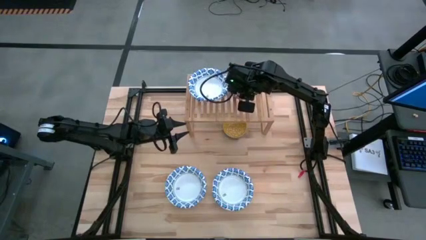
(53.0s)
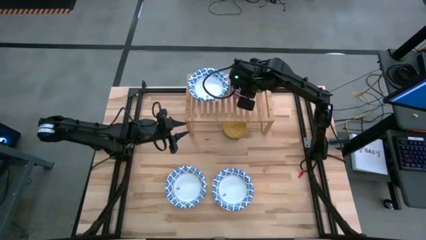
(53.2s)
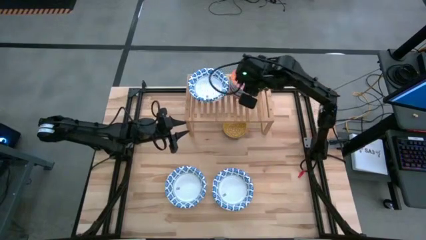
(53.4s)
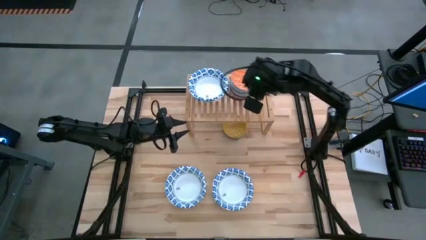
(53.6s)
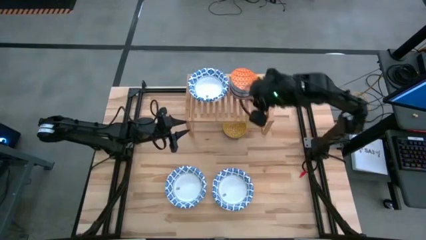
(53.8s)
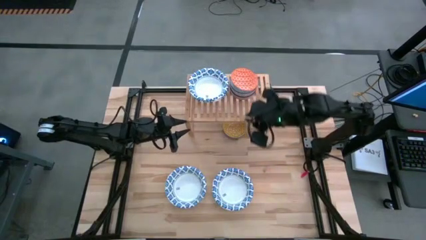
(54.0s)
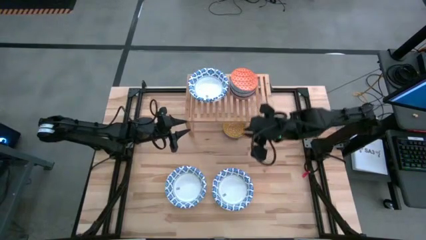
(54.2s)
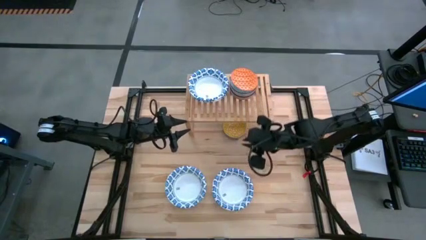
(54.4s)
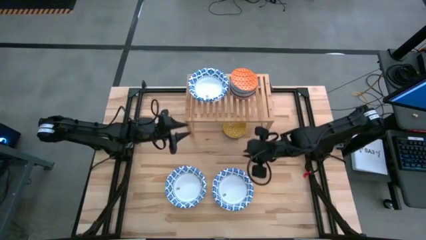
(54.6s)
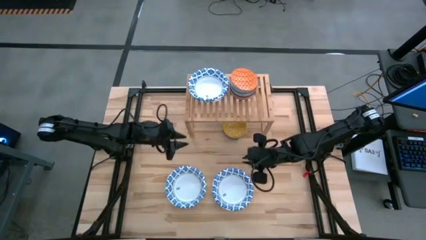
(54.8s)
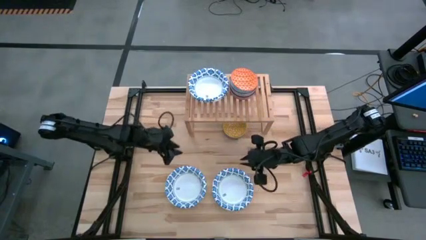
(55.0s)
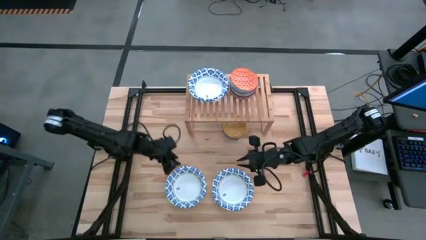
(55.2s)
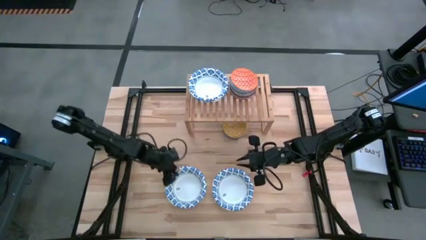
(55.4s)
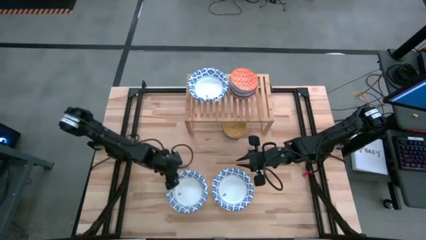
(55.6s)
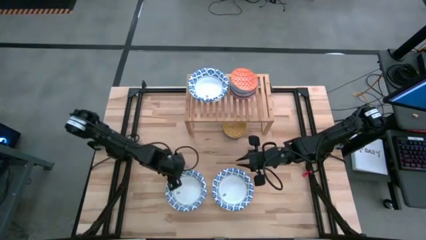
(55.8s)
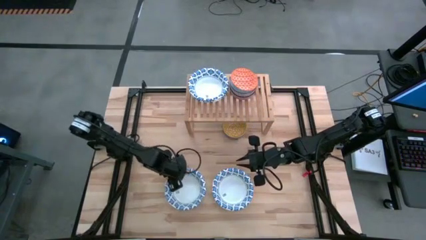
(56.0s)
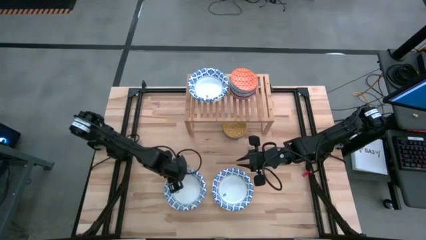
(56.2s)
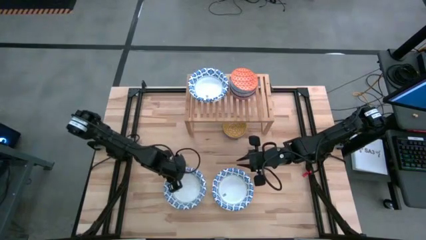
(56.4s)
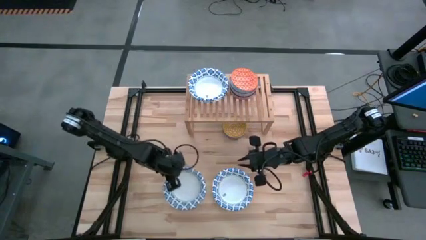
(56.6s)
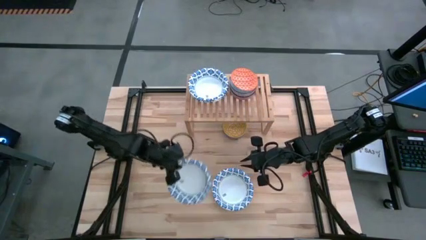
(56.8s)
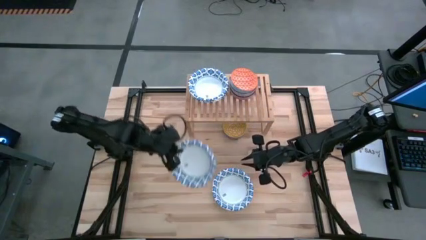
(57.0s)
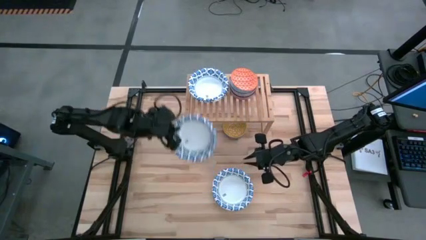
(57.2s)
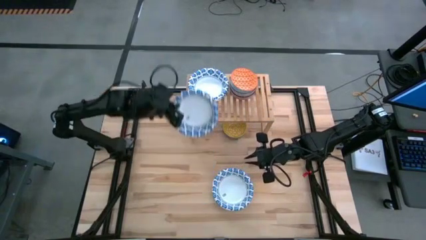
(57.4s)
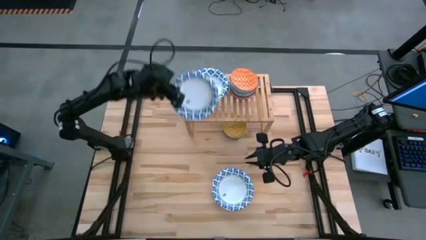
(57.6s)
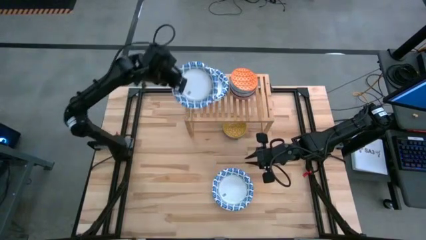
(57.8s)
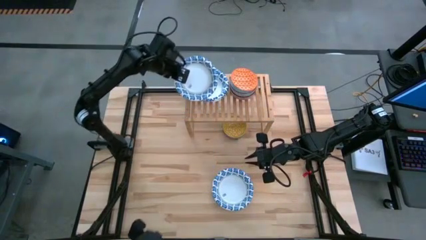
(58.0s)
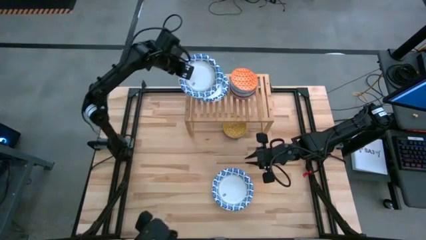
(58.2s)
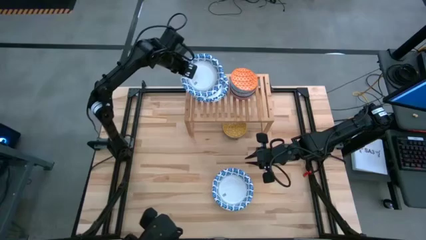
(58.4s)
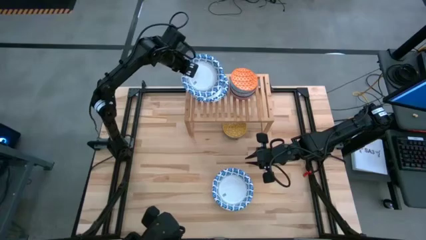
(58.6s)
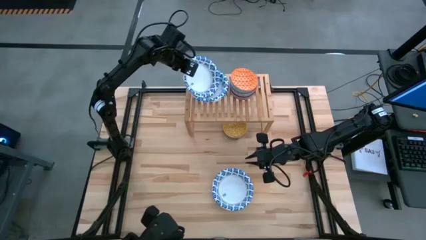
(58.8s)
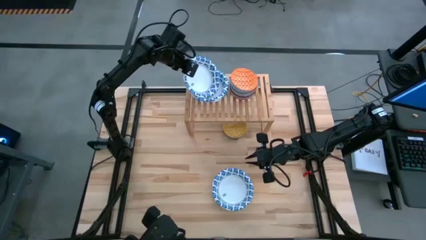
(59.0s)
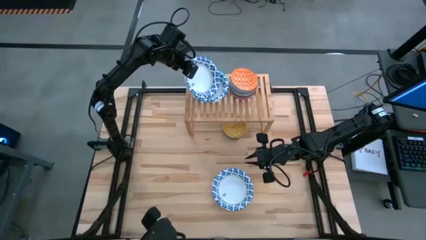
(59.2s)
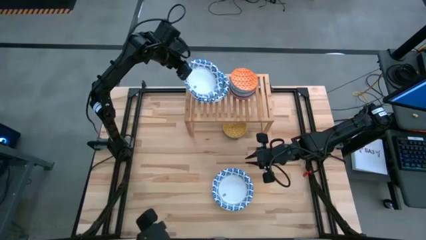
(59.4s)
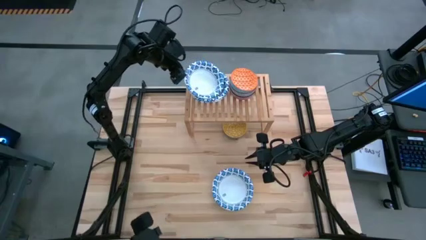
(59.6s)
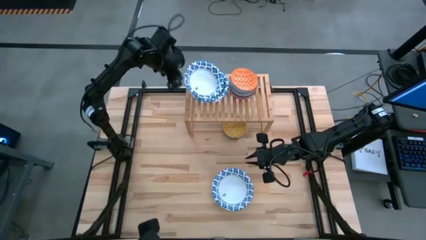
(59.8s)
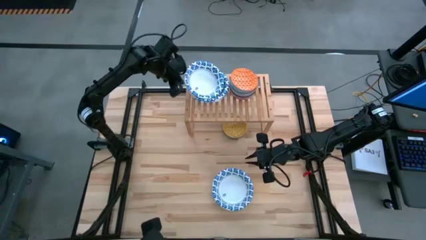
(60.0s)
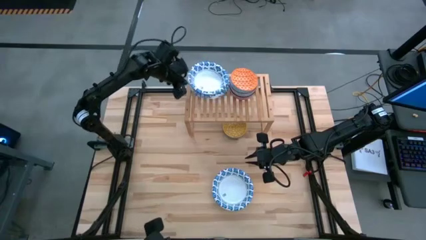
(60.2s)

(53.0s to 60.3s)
Task: Place and stack bowls onto a shelf
Stack the left white bowl on top of the white bowl on the shelf

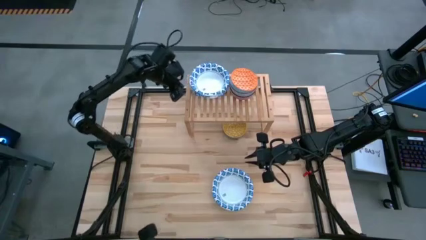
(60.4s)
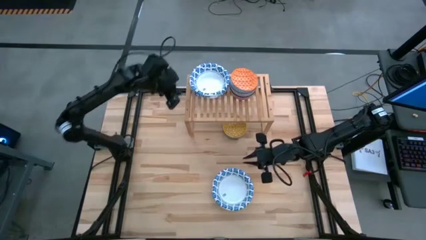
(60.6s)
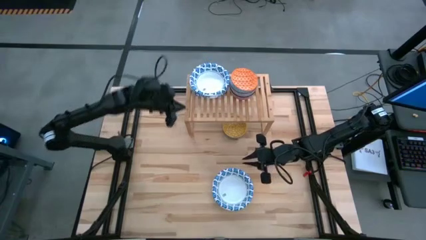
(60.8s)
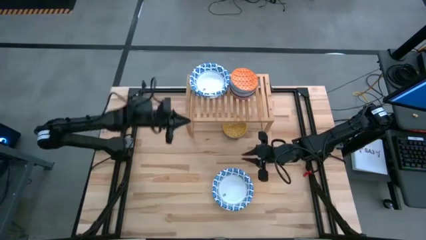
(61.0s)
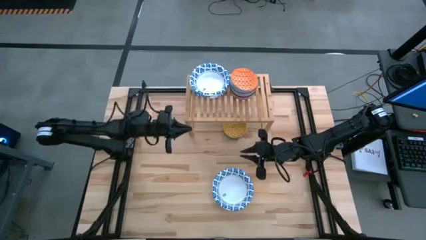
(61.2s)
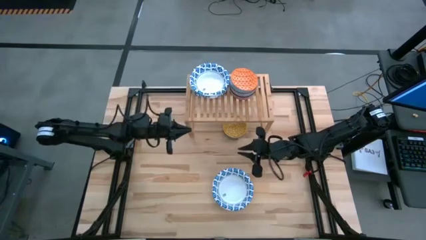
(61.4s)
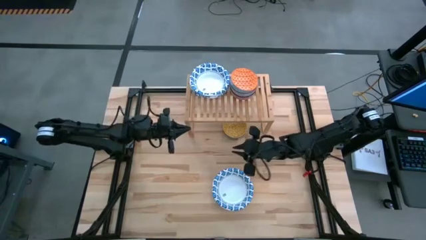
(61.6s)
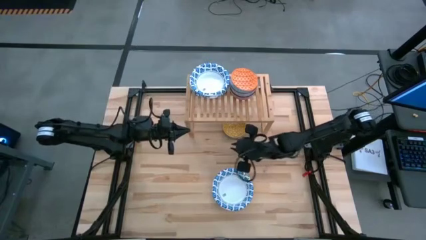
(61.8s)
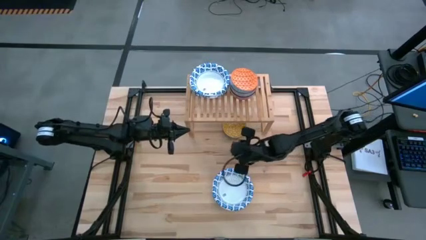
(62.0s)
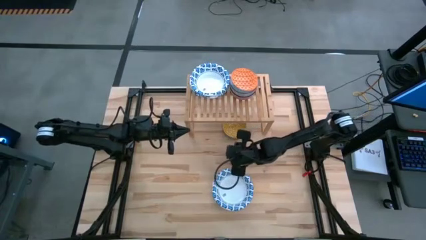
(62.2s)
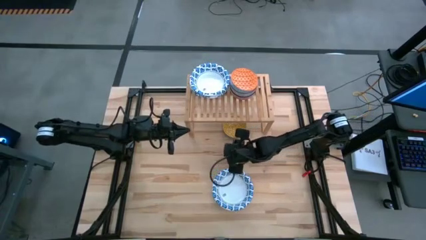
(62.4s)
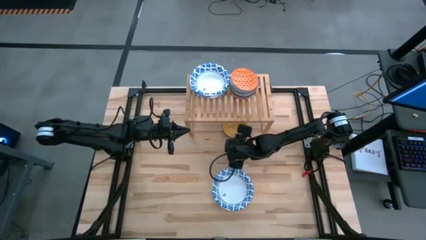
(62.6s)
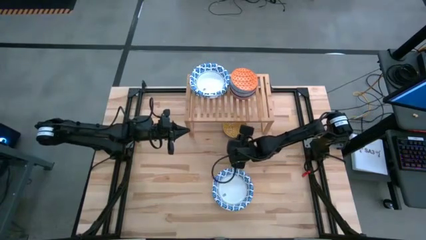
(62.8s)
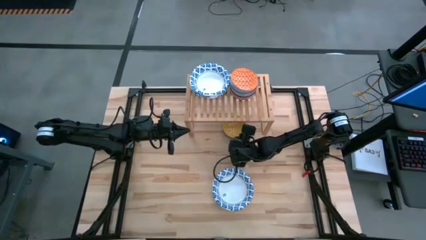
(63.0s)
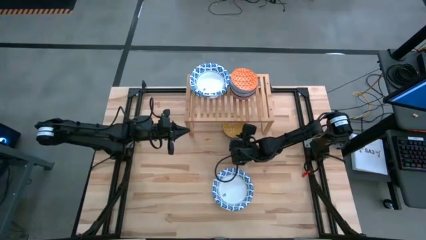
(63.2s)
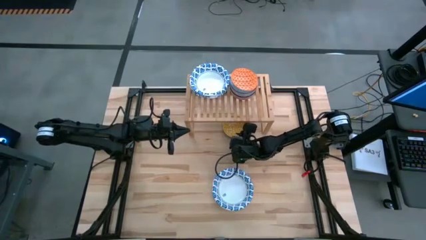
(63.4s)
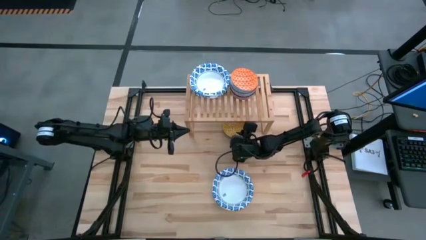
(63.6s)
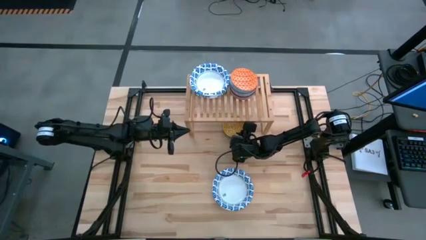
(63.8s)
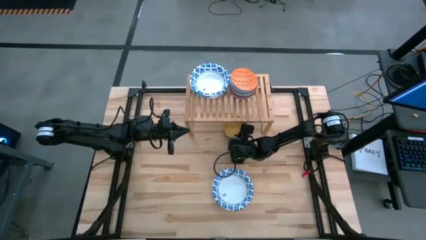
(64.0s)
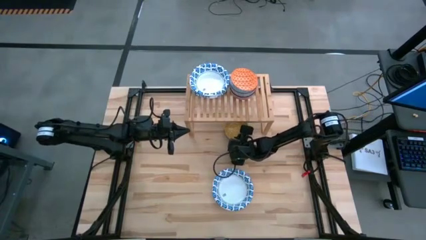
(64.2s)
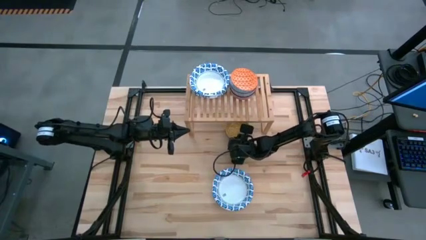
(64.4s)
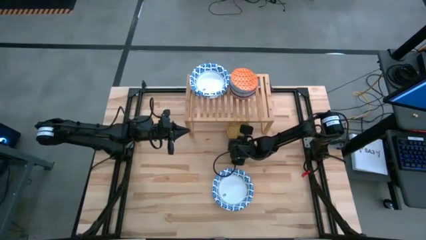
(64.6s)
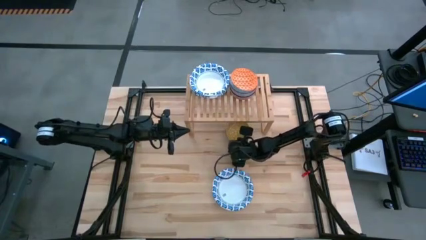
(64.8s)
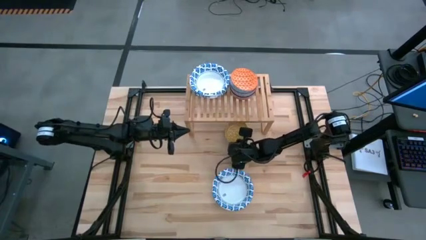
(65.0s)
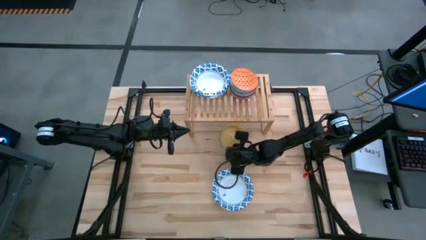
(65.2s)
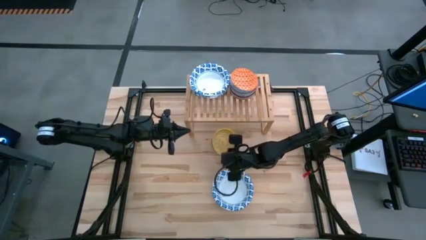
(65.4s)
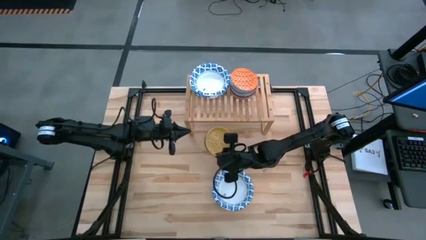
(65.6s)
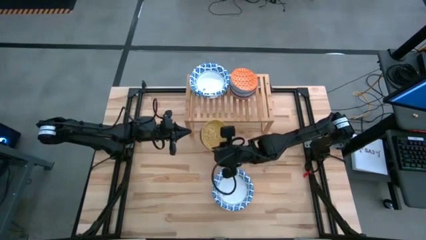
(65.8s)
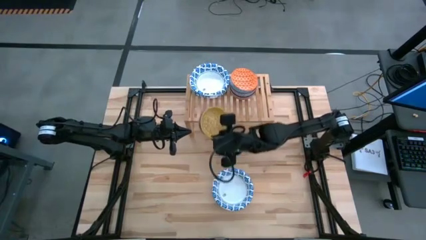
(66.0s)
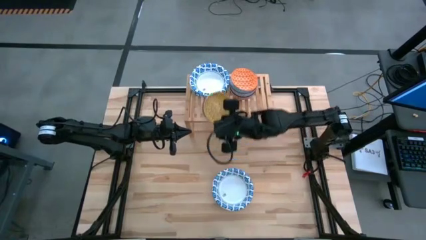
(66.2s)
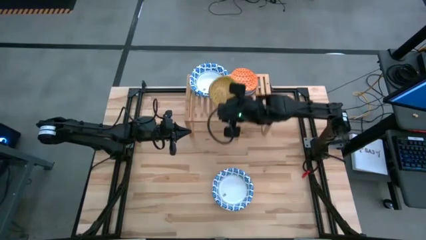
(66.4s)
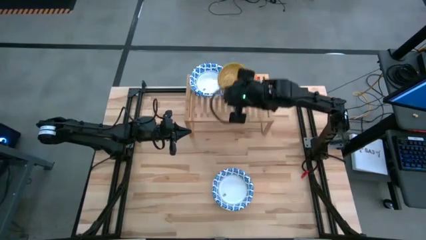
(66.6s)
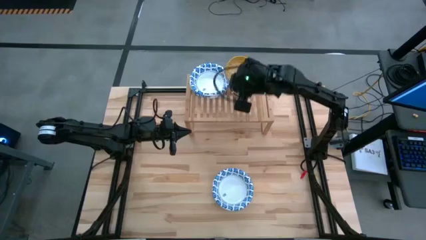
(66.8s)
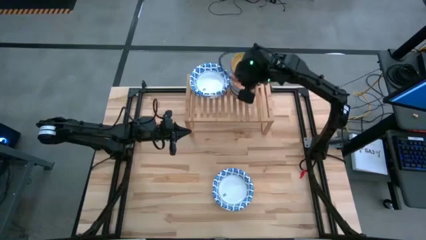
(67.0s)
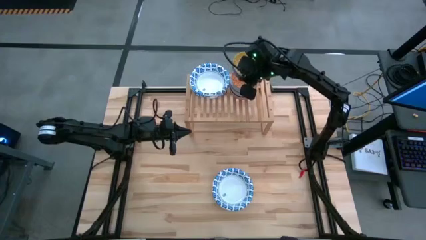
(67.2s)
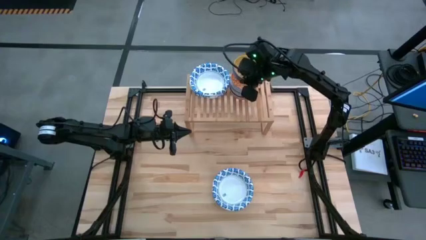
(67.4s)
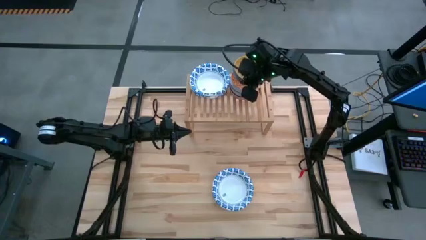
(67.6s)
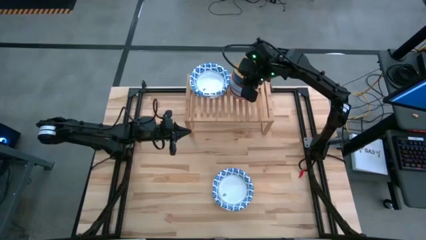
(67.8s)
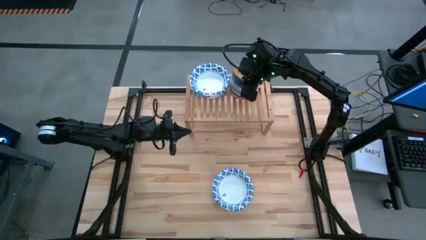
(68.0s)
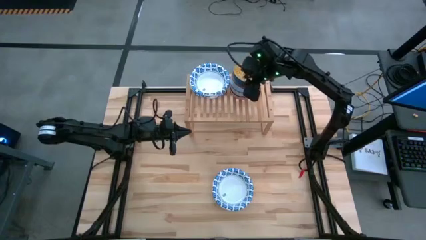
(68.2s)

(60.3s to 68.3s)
Stack the yellow bowl on top of the orange bowl on the shelf
